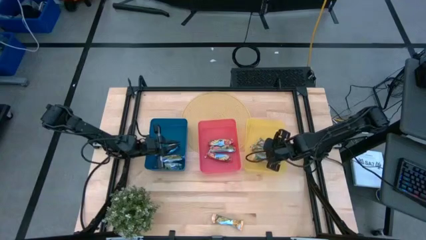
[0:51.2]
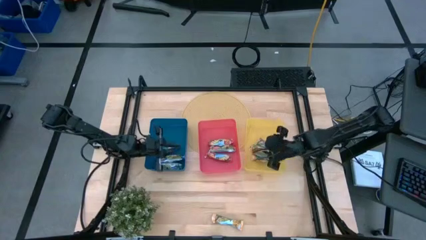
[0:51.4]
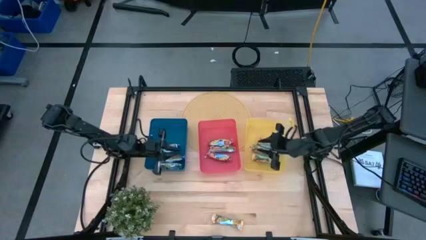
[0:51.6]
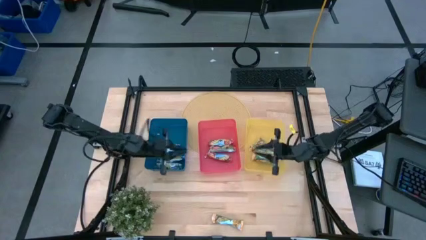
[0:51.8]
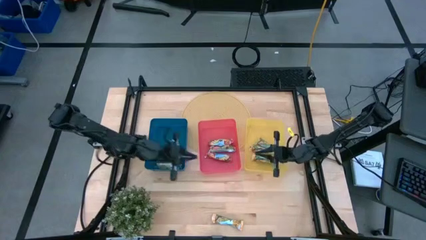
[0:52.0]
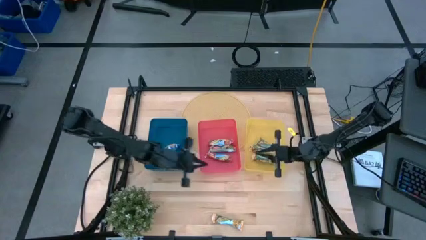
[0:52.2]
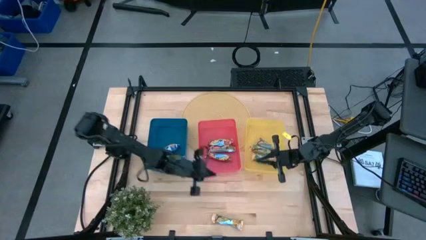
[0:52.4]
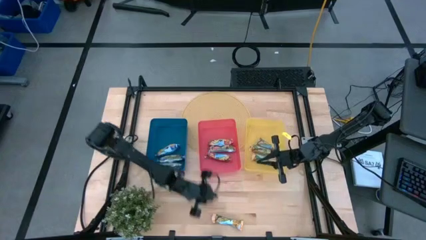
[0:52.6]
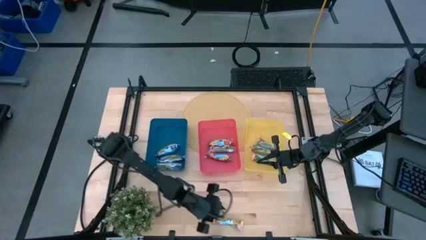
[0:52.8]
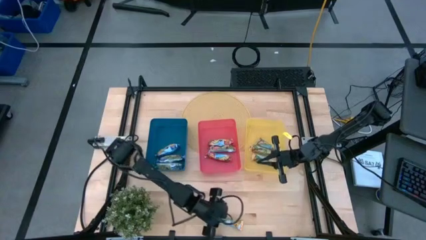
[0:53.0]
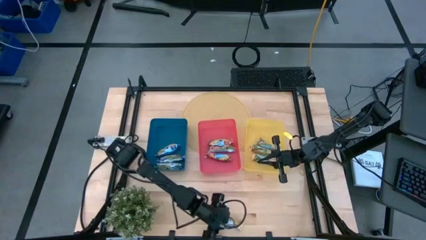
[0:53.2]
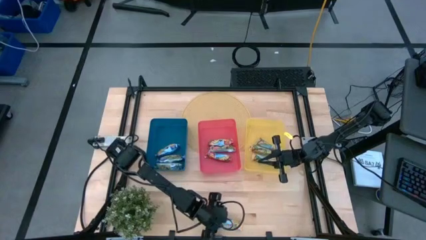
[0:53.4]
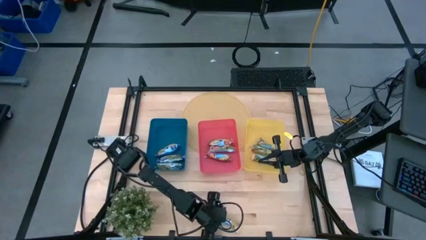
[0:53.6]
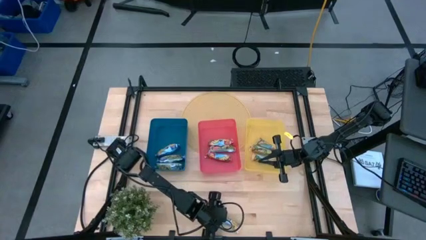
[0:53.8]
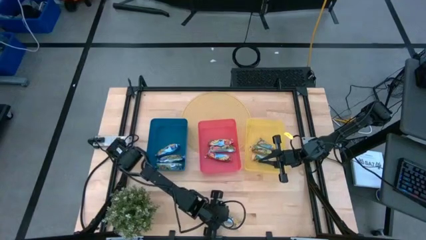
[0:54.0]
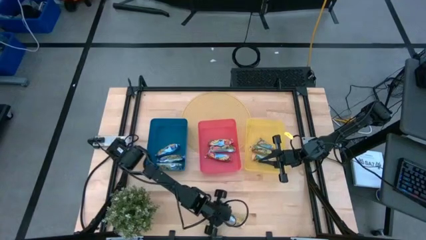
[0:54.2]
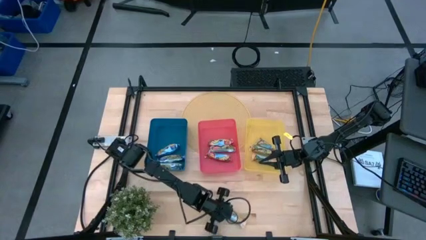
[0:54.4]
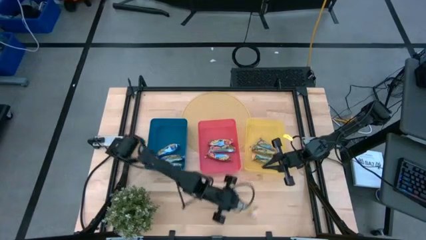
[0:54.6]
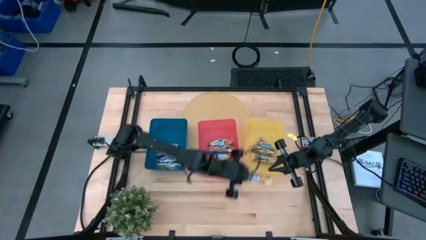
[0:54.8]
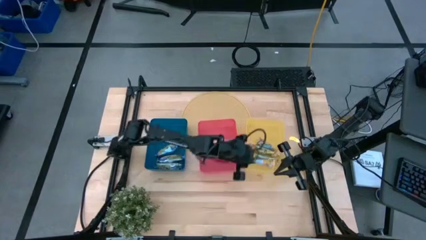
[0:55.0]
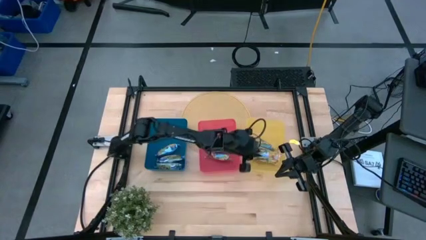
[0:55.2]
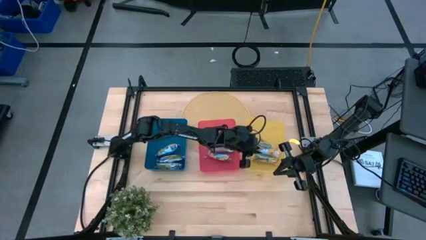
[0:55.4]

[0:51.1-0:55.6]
Task: Pick and place Granola Bars by type
Put the yellow granola bar into the yellow bin

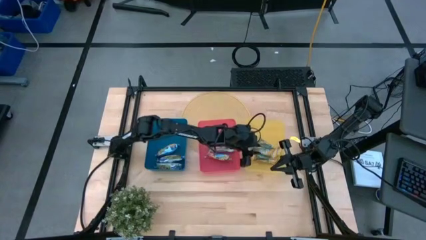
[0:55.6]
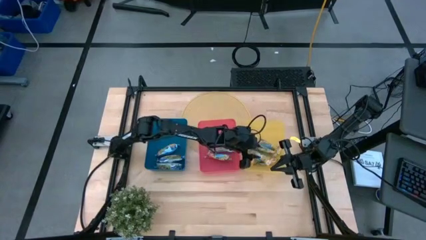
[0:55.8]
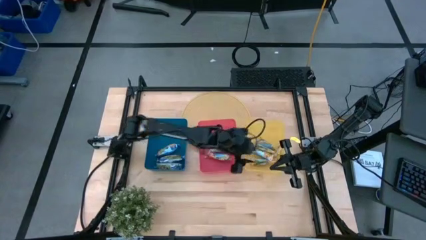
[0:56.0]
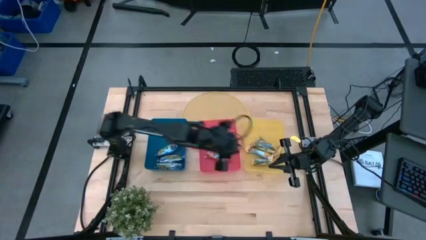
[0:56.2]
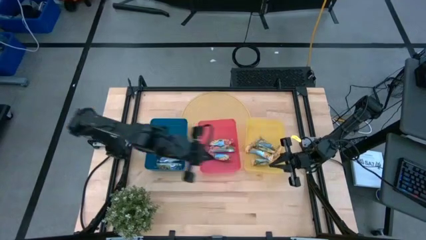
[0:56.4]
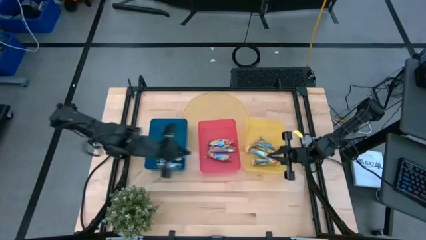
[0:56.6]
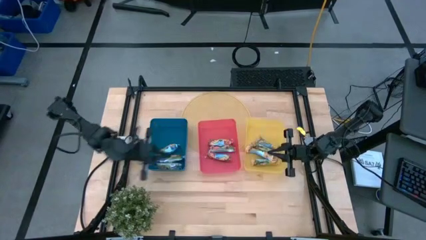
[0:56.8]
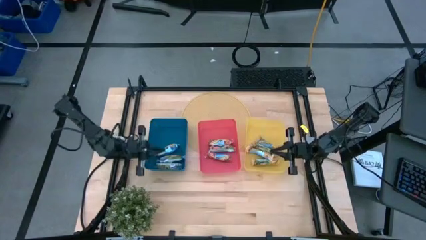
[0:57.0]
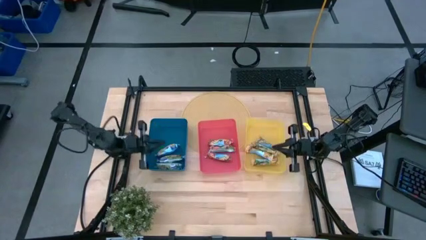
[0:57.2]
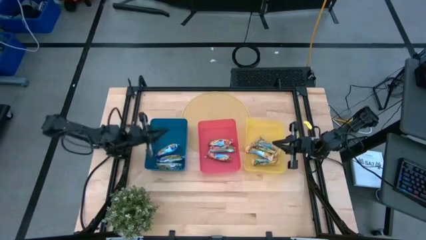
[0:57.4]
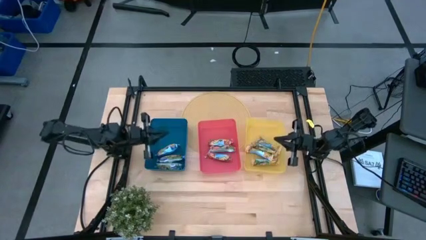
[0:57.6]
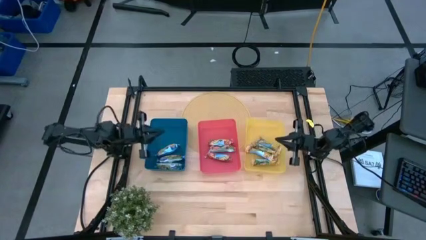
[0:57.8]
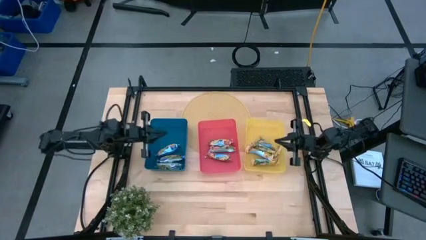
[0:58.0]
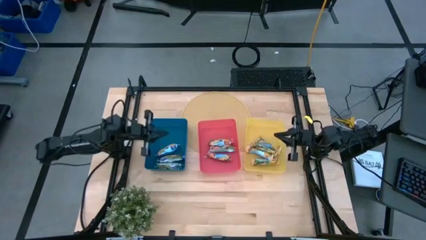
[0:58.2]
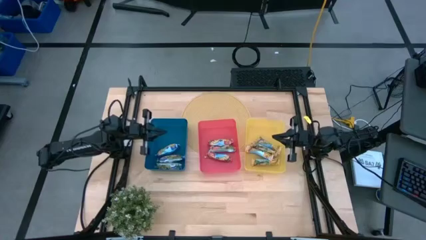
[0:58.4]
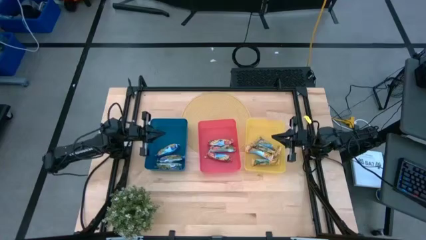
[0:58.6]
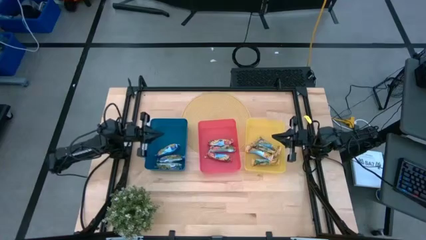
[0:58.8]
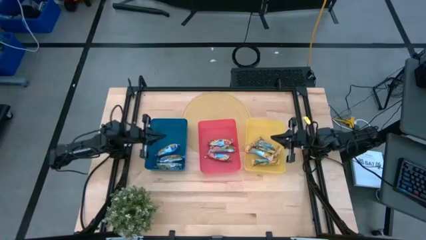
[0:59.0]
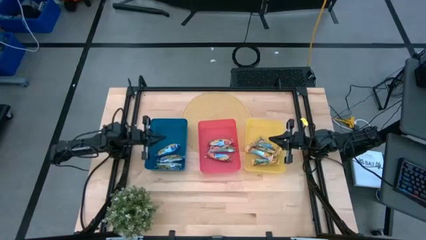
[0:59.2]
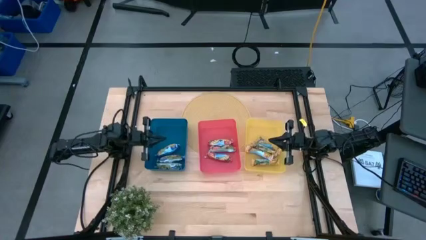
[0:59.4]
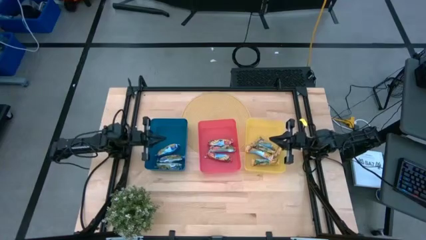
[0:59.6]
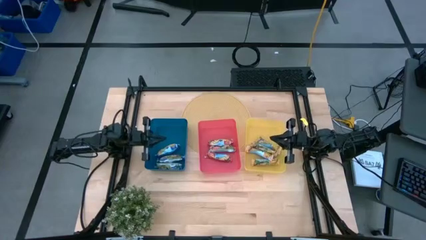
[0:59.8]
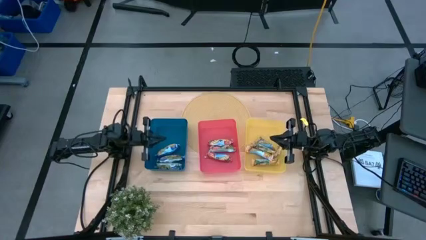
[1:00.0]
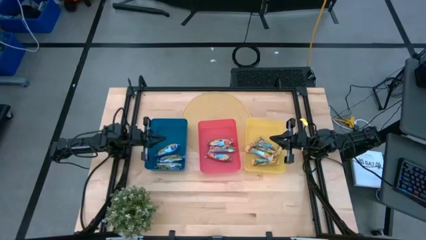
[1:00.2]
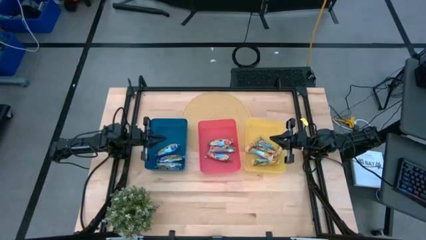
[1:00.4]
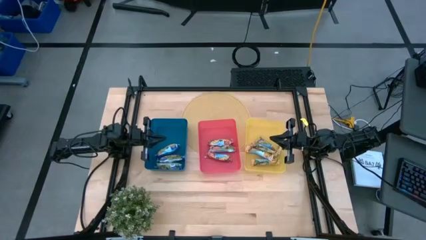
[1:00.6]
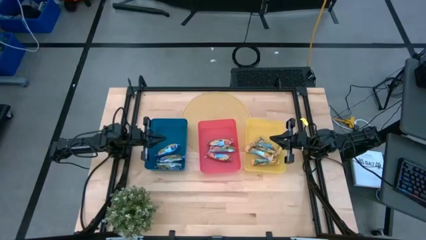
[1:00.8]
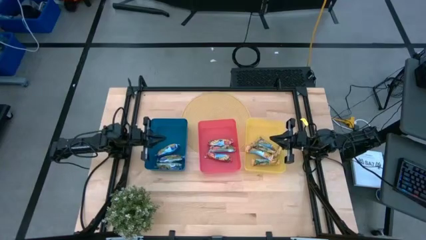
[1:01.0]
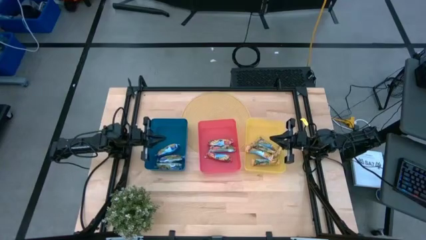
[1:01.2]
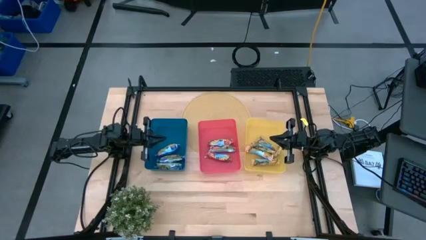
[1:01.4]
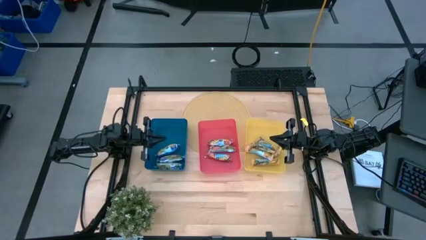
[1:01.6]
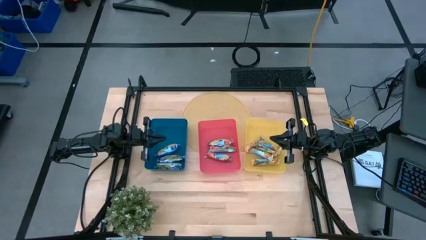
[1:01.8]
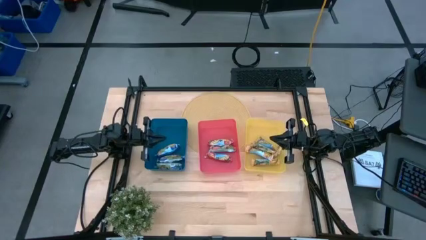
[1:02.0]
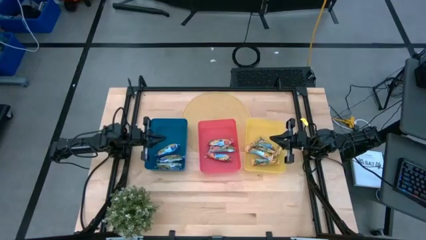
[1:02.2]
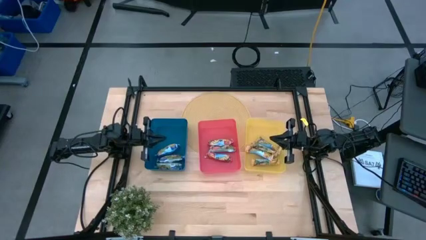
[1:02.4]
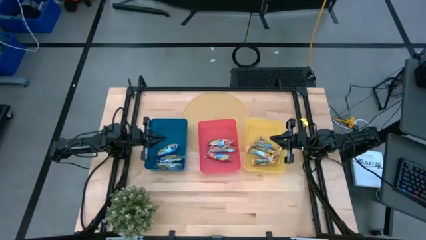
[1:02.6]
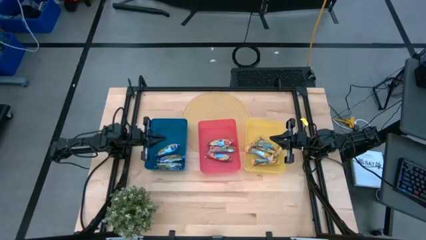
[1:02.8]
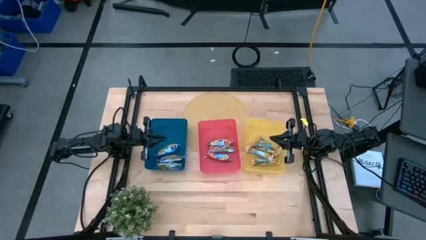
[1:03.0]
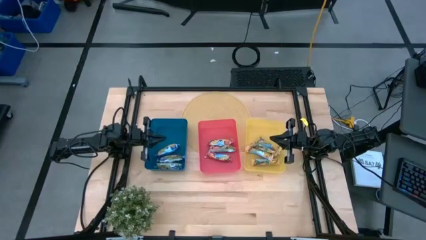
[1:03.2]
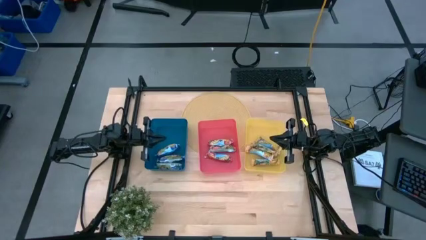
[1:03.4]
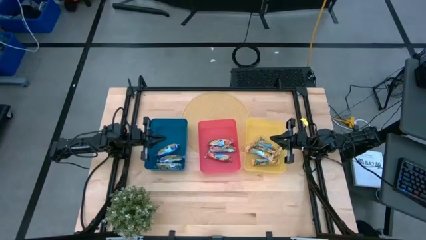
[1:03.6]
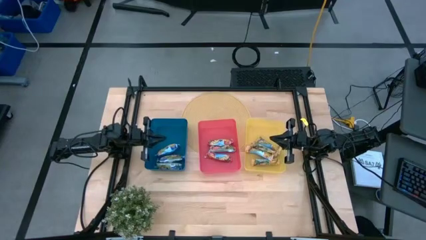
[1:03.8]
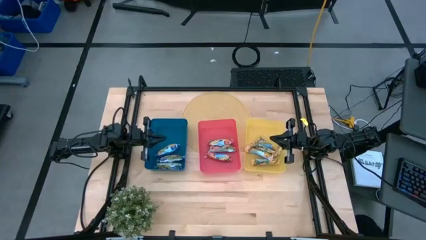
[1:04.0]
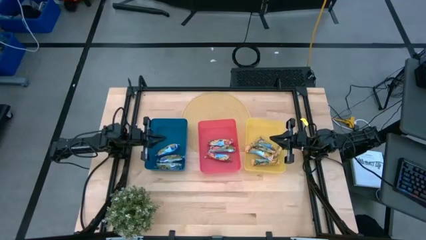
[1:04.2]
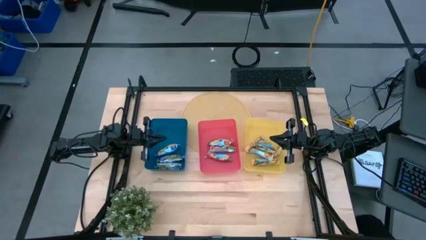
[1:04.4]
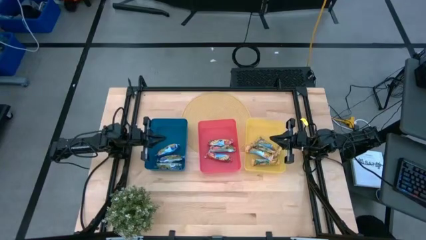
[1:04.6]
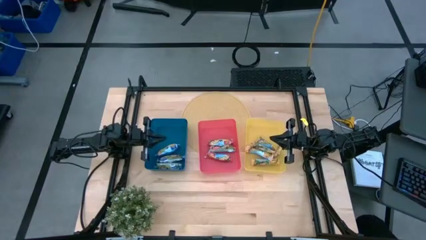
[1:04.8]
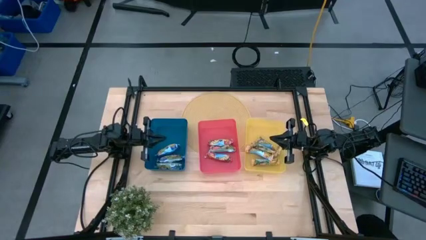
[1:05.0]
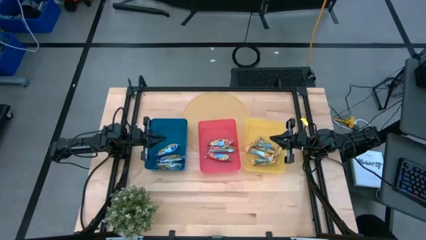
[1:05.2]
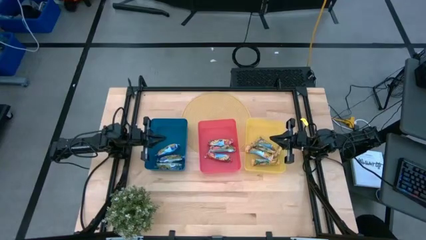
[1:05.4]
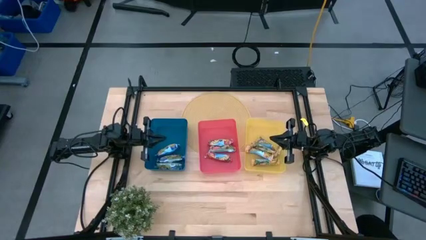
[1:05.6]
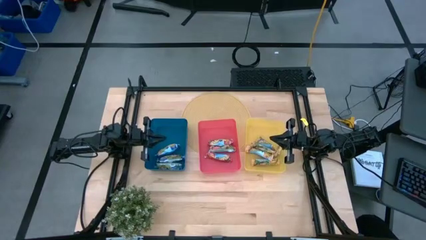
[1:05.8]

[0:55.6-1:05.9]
Return to Home Position

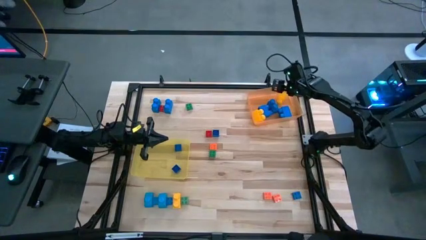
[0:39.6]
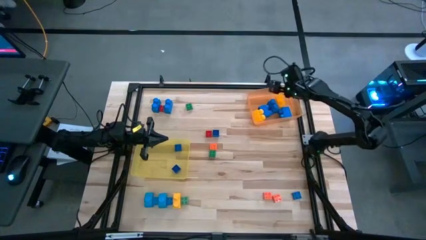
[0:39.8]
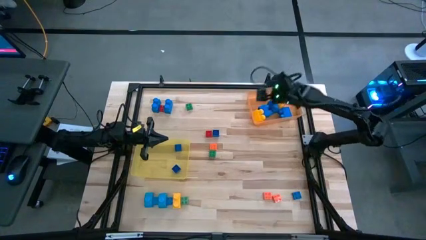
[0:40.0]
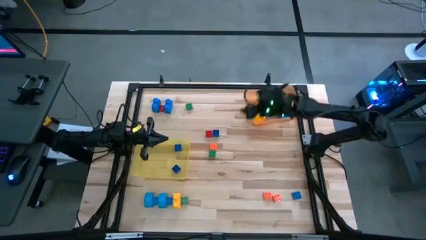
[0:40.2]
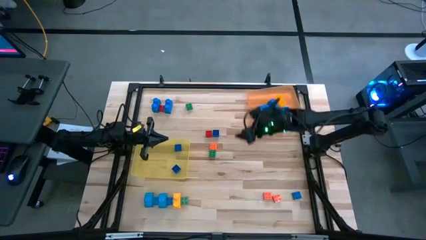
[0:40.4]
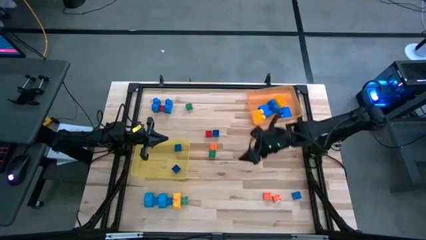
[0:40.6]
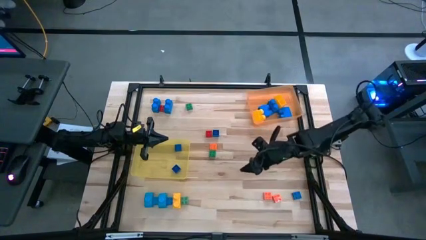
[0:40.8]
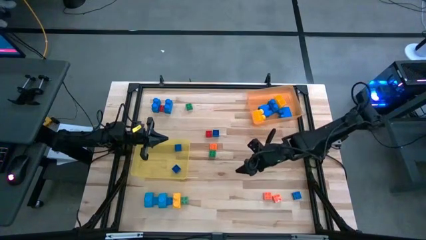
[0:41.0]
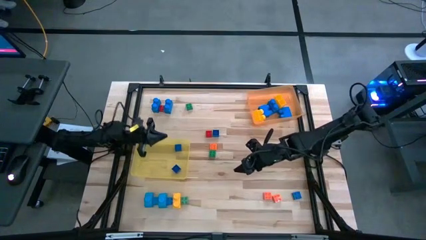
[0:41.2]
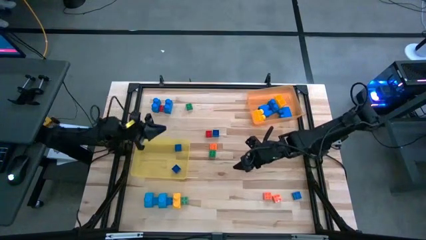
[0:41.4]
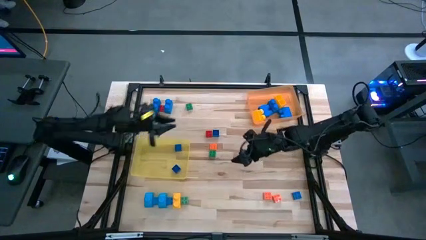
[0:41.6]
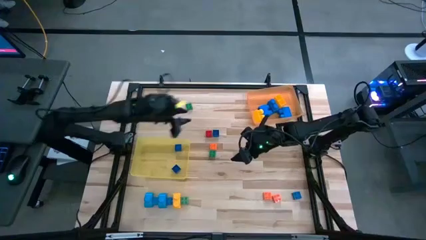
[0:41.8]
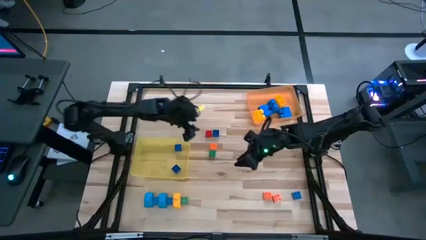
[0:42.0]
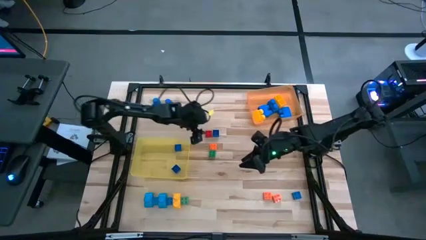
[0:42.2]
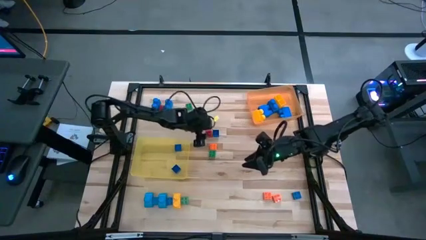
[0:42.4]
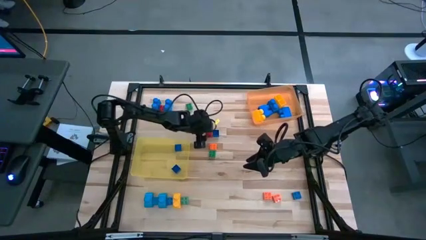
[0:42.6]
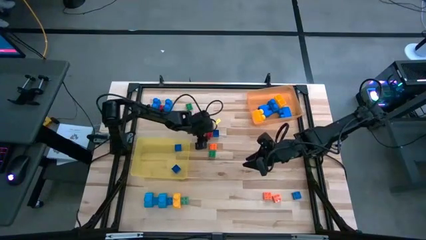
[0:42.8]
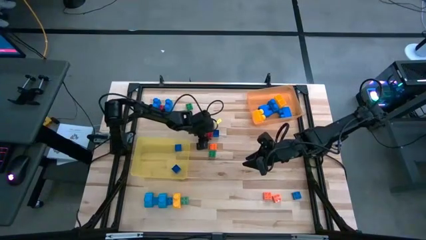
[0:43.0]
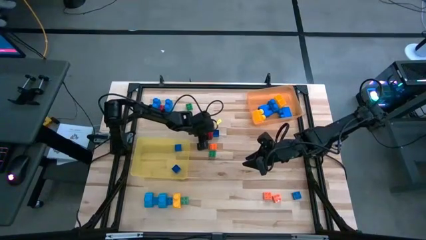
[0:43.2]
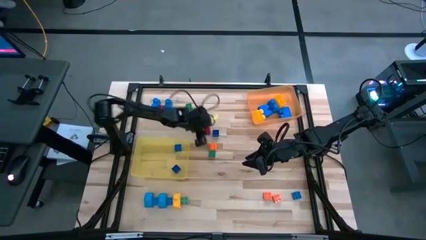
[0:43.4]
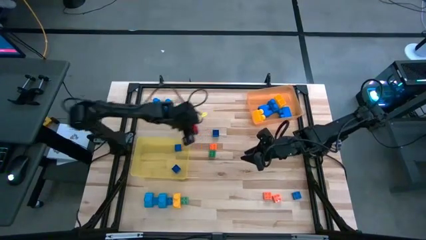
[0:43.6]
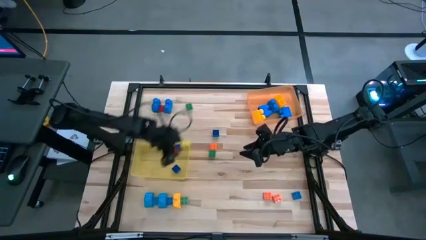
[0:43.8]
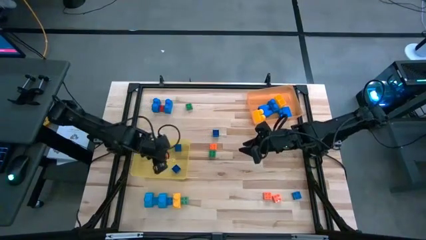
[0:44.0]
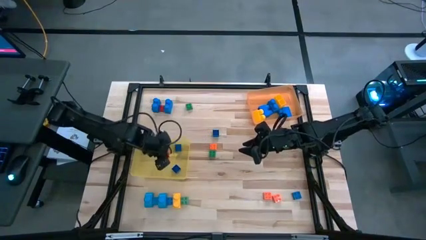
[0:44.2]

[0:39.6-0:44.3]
Task: Sort blocks by size
Put the small red 4 stud game piece into the yellow bin
